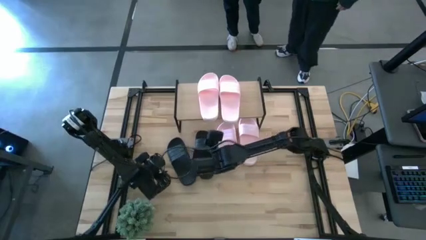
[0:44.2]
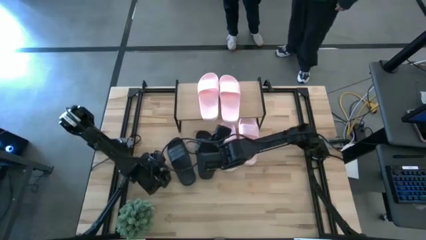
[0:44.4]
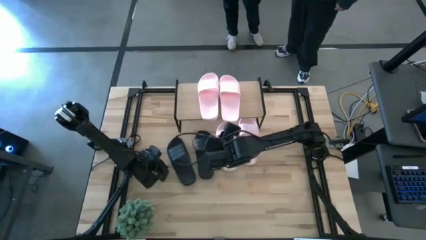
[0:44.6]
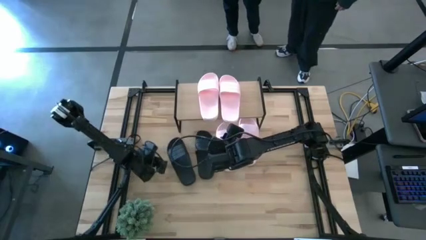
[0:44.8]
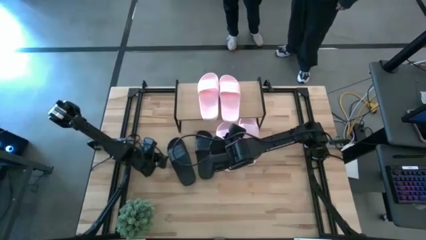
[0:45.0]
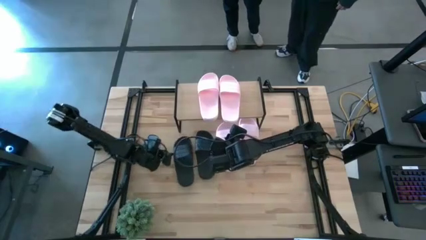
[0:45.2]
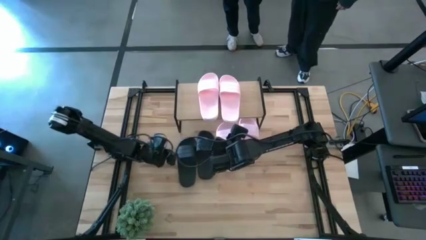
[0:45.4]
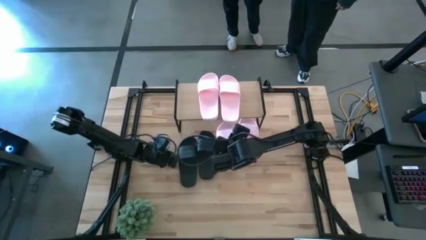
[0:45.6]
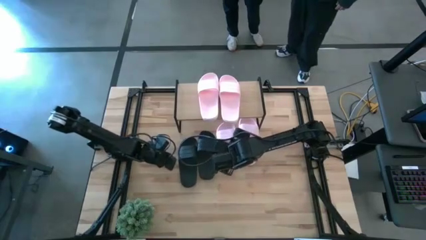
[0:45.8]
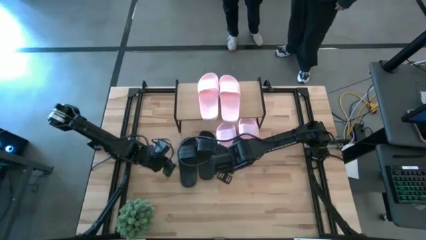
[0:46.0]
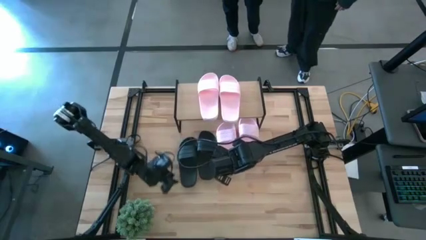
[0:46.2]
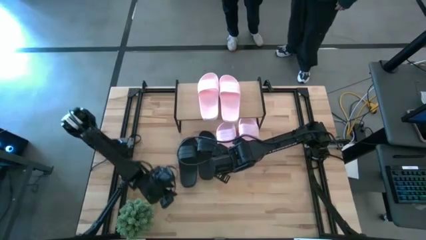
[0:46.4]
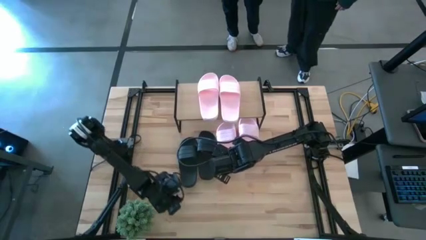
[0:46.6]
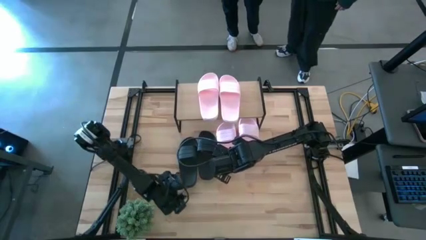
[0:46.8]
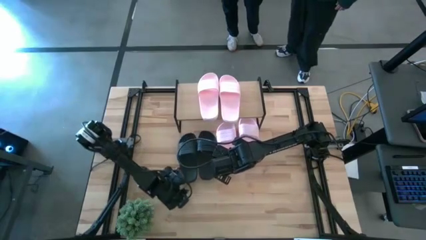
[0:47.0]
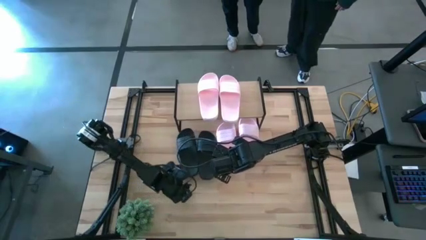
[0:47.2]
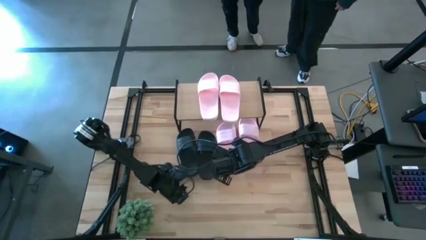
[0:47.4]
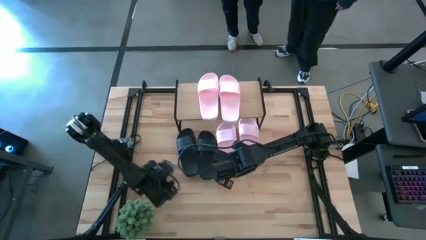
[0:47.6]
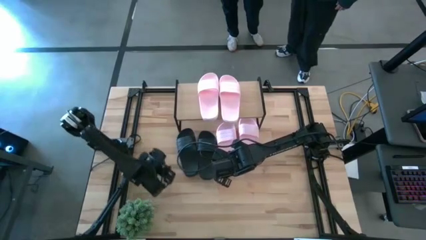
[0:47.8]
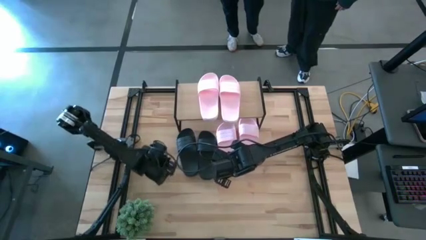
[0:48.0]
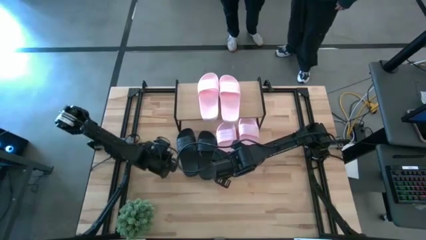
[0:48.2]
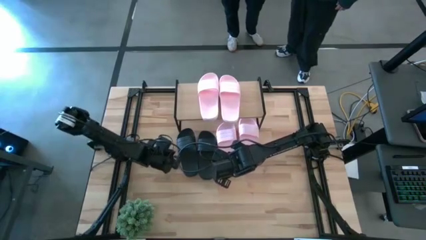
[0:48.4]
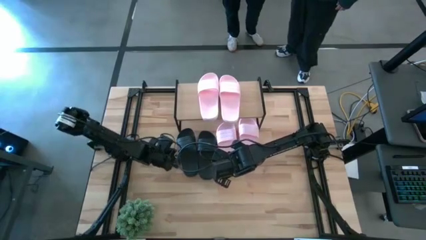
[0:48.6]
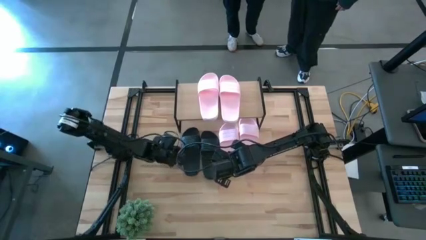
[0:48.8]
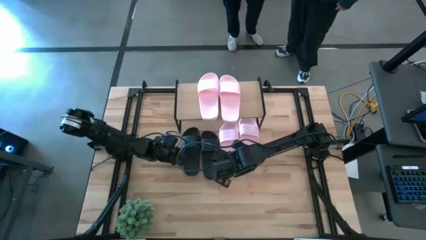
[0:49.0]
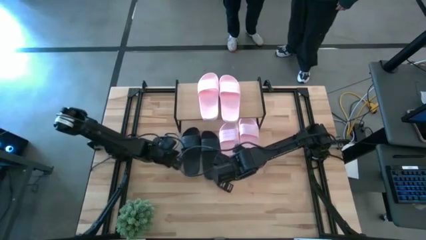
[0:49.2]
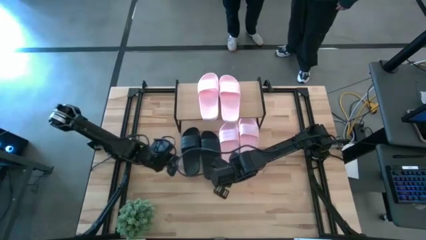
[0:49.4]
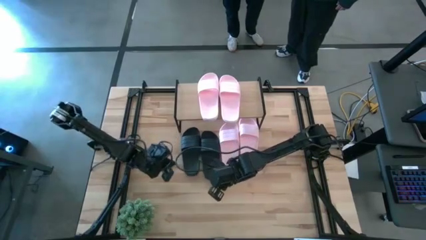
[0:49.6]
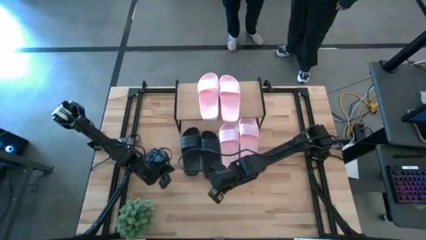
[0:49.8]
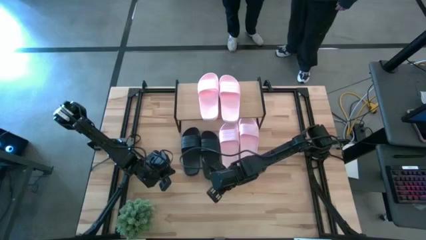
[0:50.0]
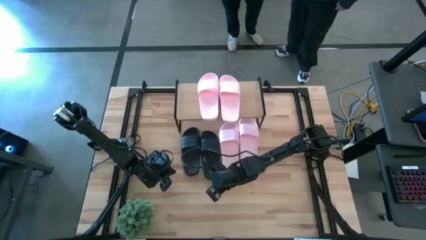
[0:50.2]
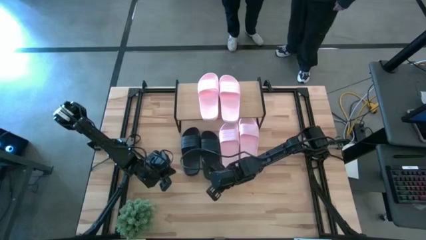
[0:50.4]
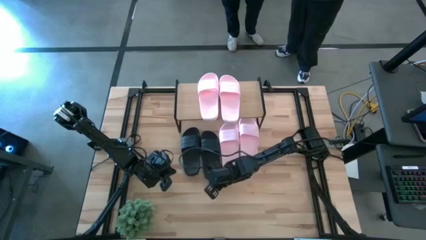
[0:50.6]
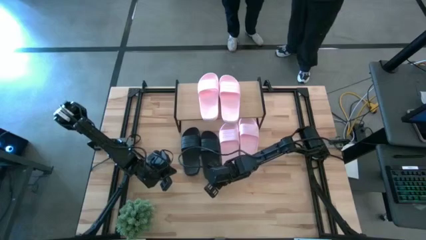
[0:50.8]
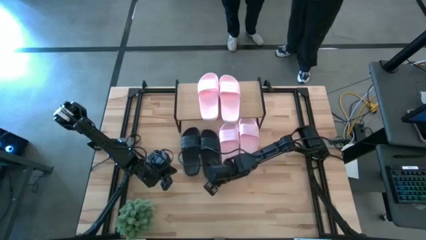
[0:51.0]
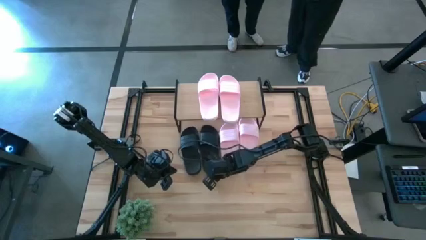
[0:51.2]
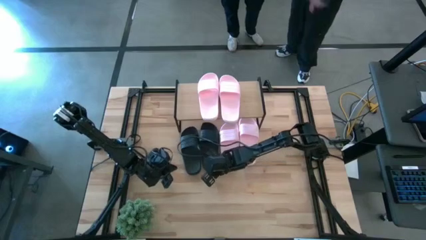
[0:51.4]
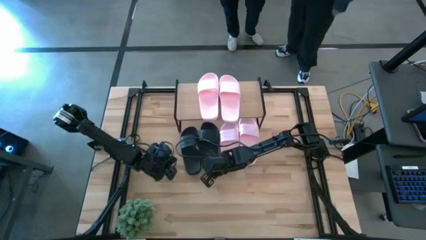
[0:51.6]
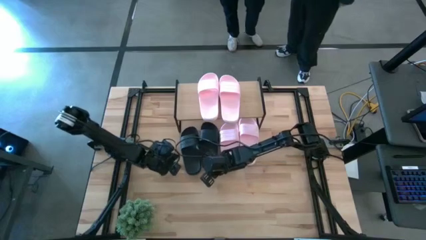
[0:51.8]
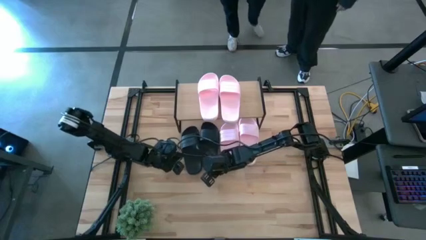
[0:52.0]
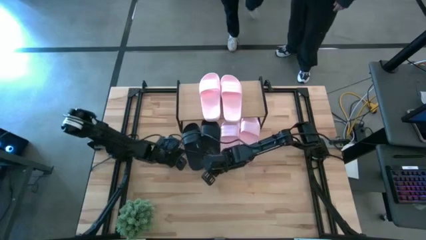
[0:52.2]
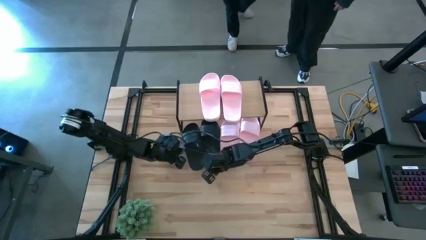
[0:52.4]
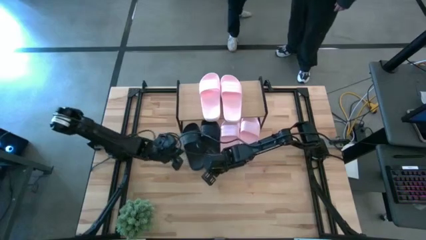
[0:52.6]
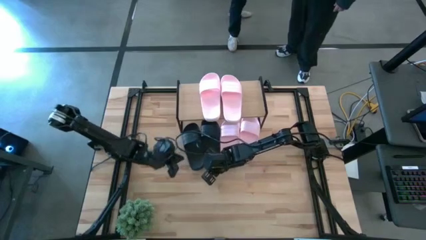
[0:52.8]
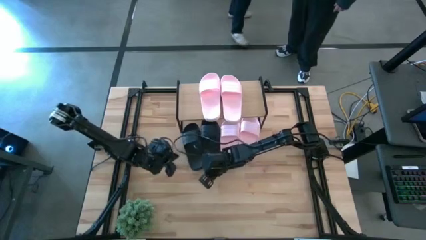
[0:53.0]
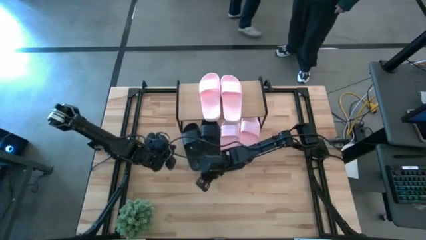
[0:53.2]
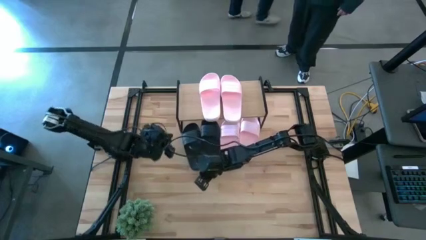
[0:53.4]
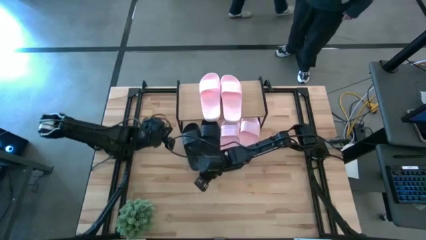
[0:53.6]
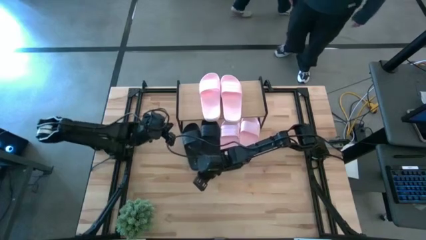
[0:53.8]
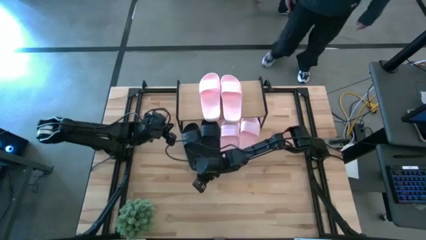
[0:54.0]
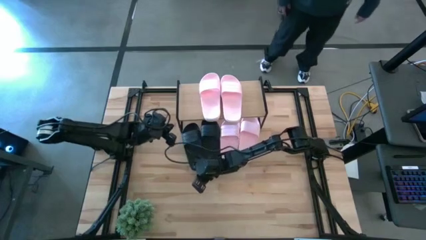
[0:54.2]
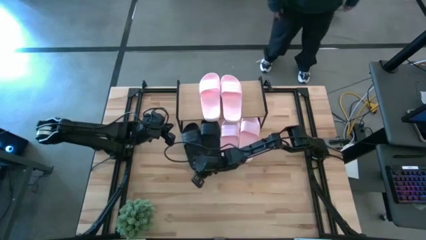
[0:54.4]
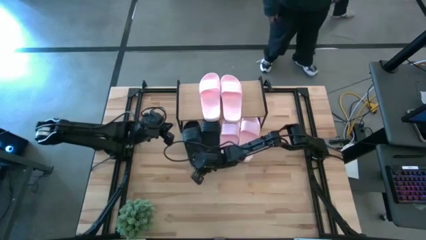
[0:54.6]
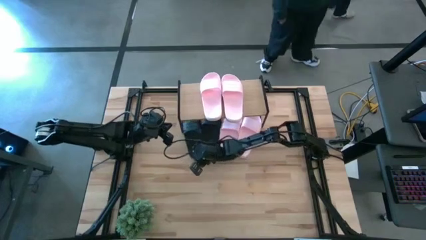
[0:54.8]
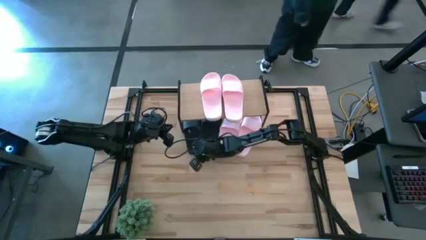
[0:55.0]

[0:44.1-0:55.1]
Task: Pick and place slides into the shelf
Adjust the black sandals under the shelf

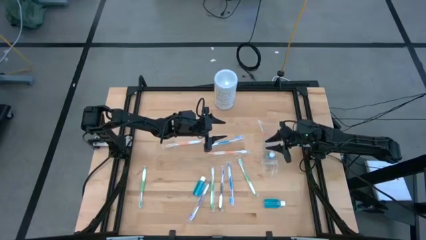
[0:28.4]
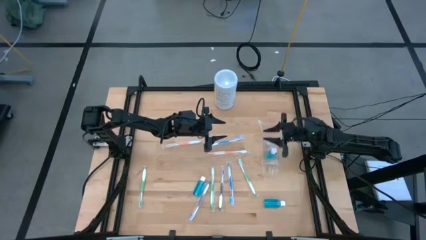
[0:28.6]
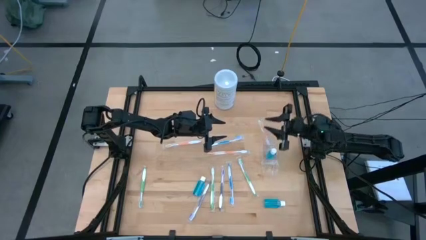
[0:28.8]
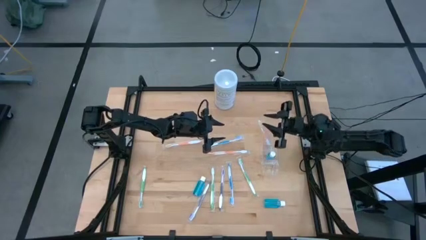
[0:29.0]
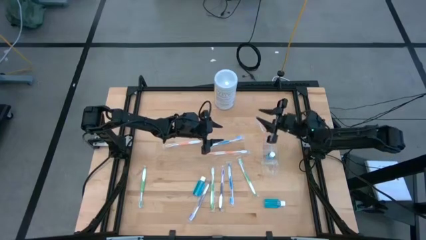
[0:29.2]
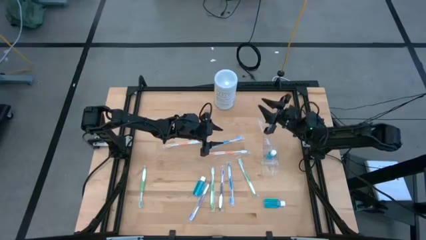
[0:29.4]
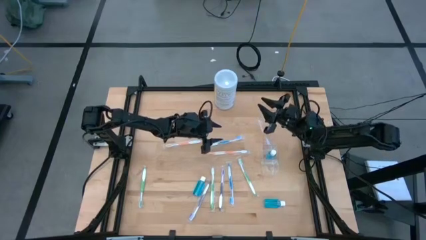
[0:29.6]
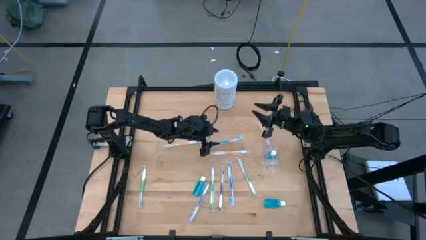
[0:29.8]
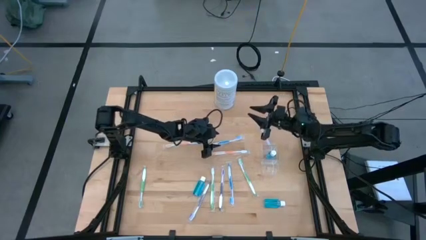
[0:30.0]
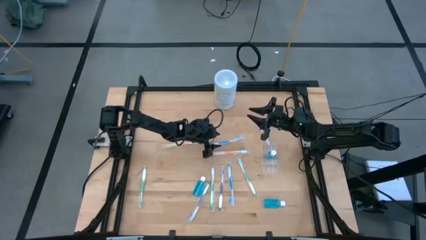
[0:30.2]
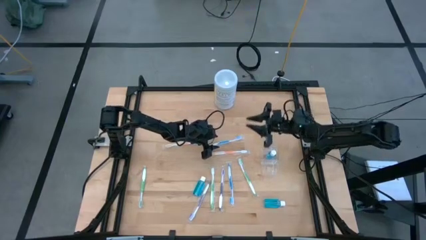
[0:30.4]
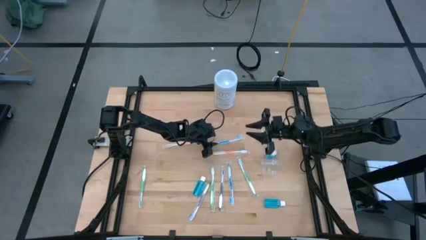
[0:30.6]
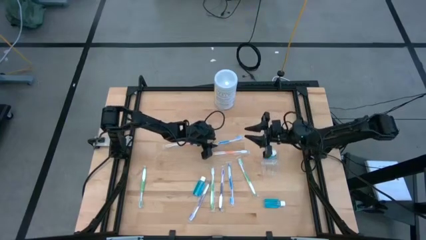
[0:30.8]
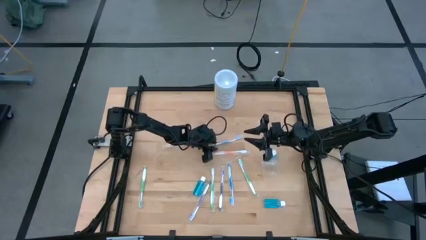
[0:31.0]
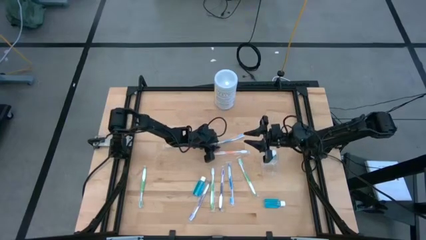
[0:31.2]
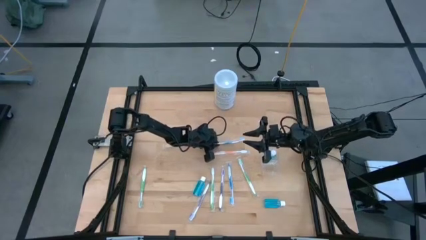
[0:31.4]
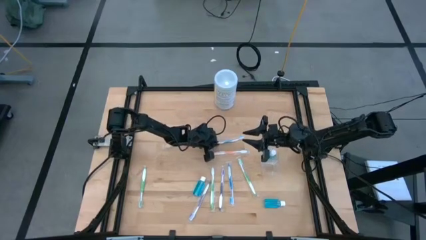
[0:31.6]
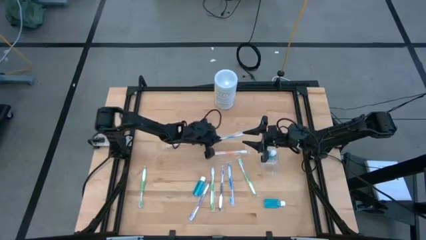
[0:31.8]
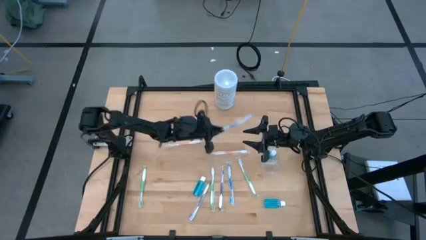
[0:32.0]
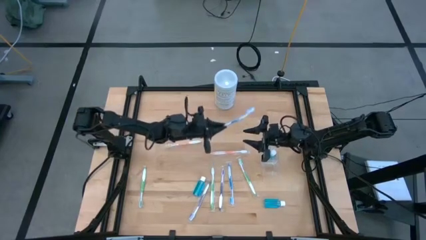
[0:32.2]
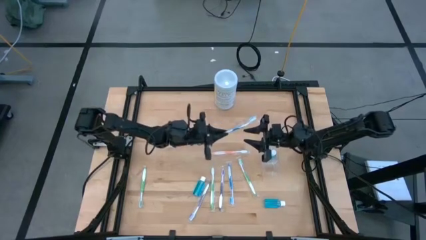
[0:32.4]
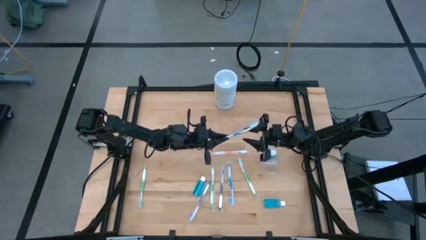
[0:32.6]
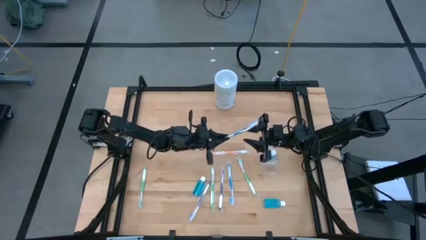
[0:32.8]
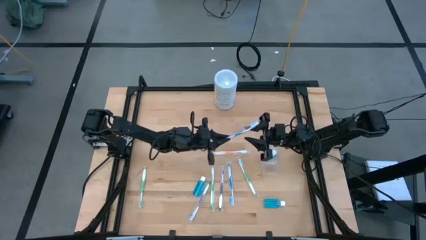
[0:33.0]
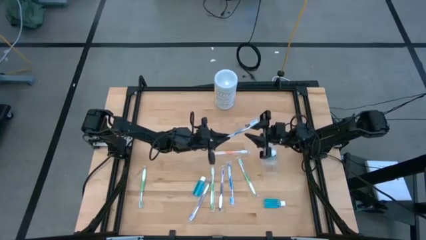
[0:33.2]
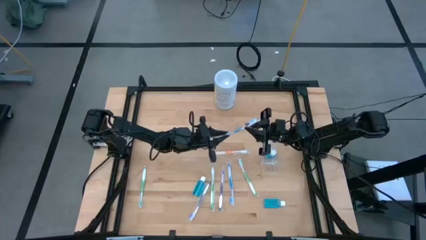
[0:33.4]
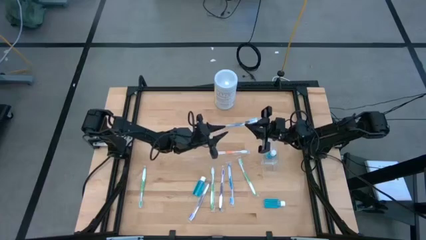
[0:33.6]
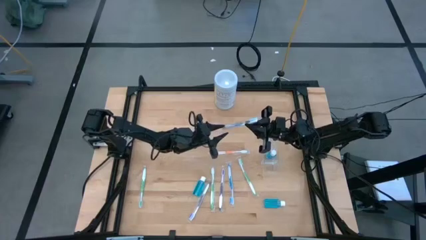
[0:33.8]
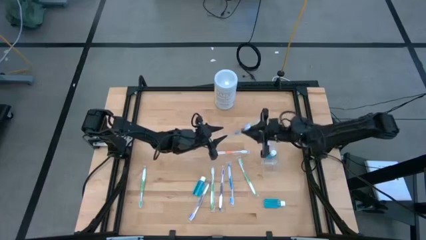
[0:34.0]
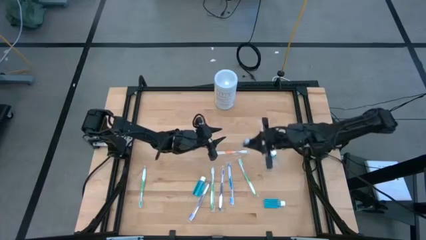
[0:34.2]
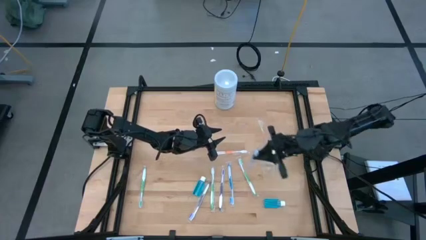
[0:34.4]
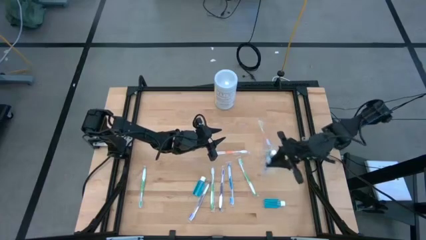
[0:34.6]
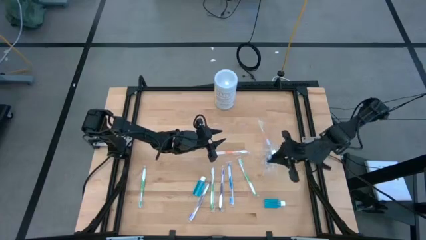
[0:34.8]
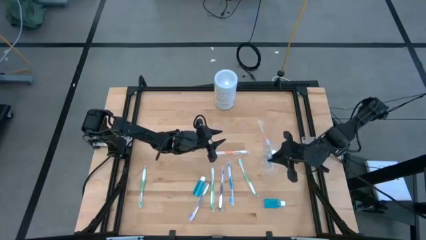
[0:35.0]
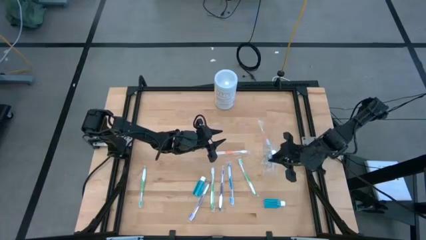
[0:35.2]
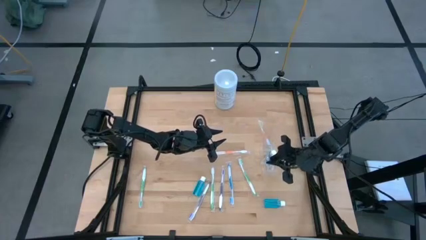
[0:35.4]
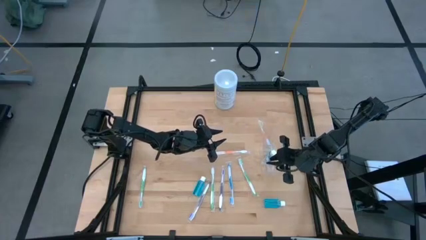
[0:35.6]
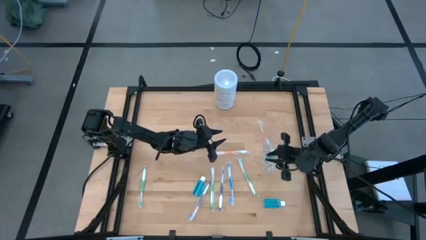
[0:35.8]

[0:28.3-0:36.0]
Task: Pick & Place toothbrushing station
Put the top blue toothbrush into the transparent organizer
